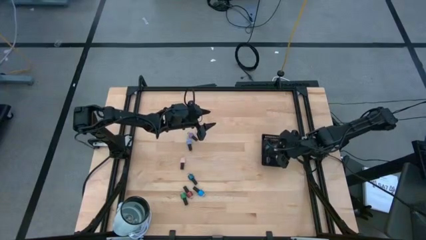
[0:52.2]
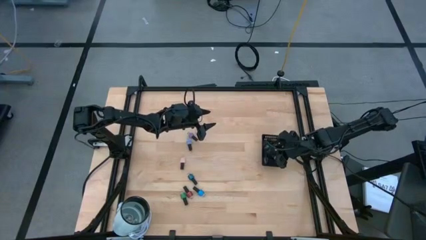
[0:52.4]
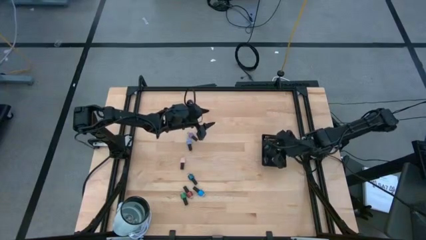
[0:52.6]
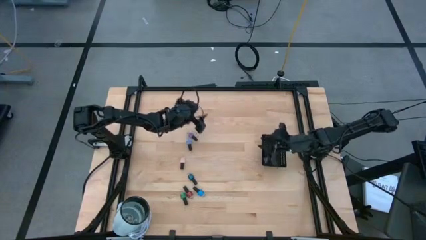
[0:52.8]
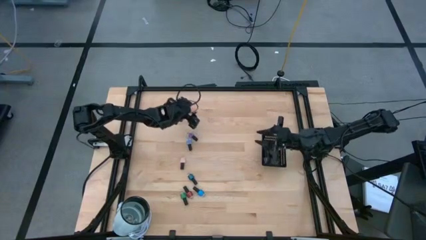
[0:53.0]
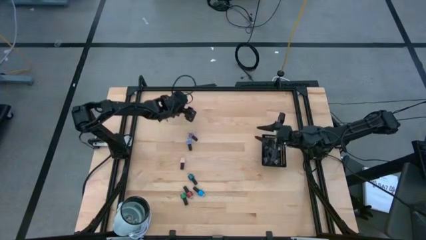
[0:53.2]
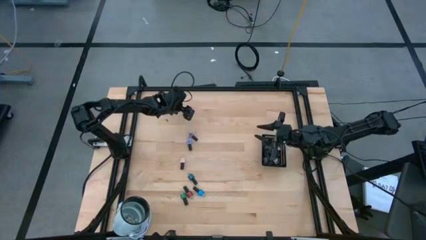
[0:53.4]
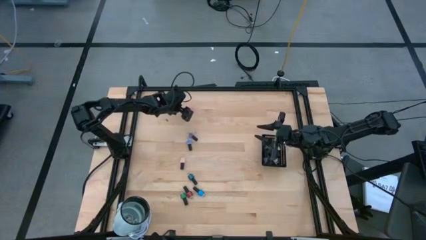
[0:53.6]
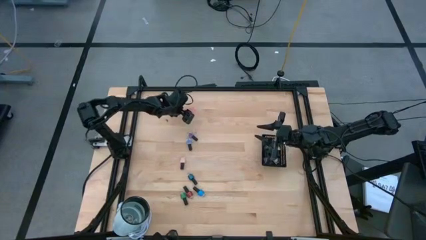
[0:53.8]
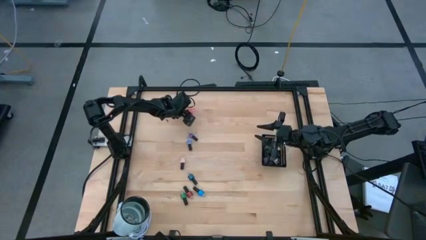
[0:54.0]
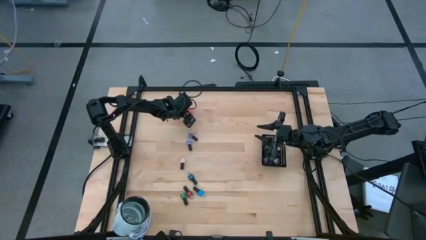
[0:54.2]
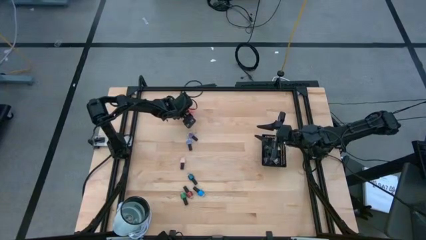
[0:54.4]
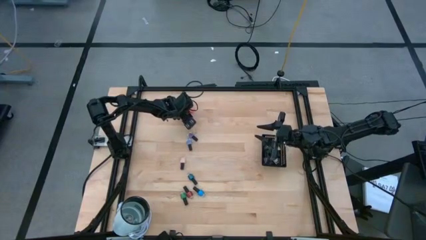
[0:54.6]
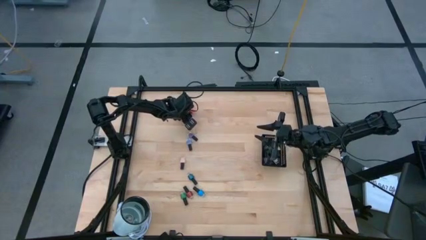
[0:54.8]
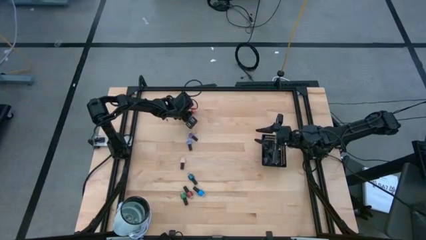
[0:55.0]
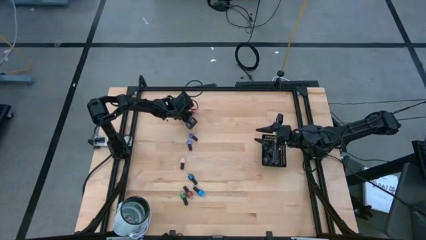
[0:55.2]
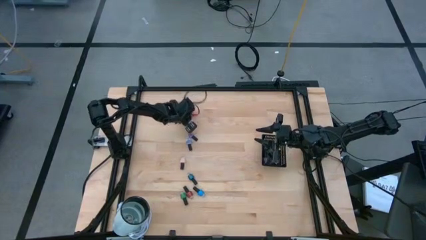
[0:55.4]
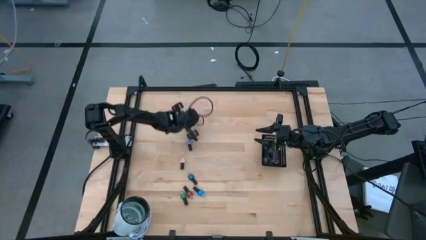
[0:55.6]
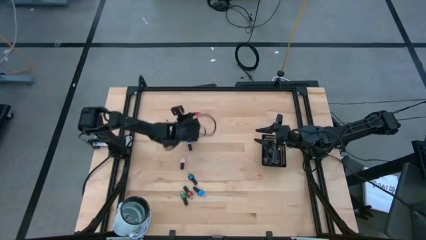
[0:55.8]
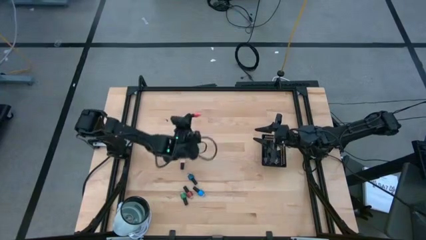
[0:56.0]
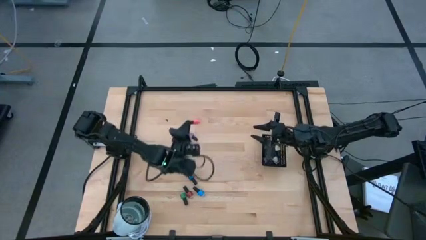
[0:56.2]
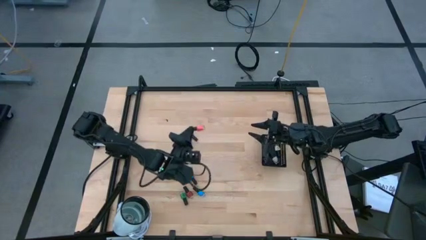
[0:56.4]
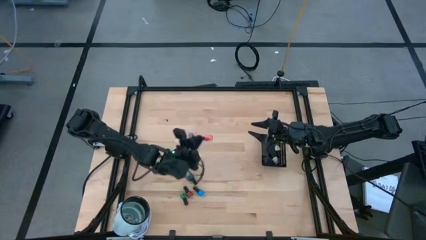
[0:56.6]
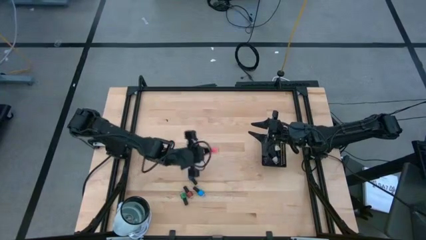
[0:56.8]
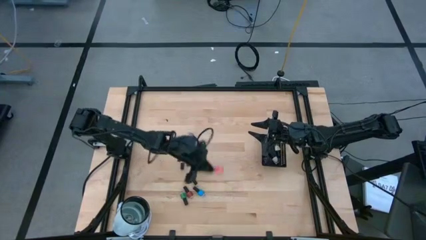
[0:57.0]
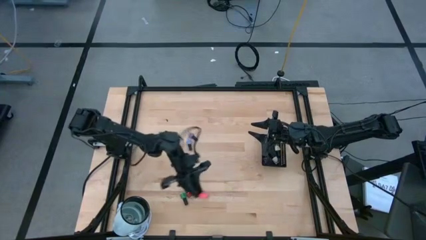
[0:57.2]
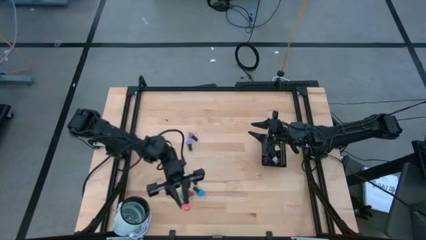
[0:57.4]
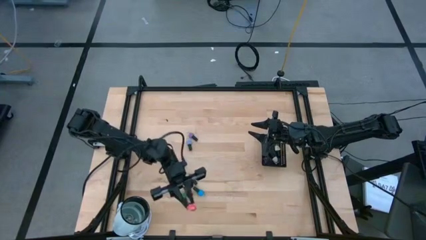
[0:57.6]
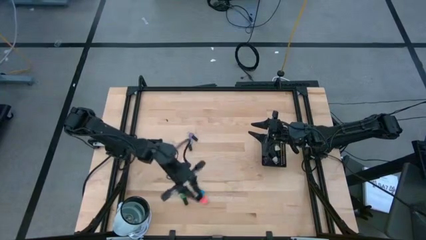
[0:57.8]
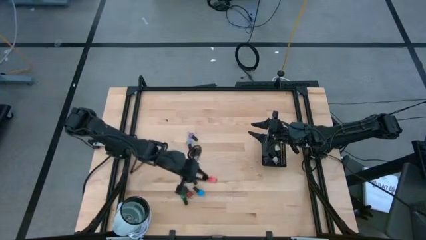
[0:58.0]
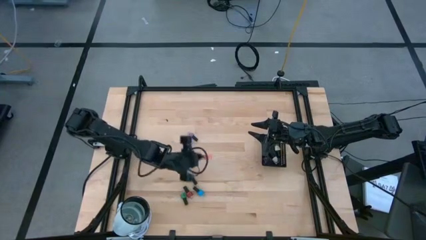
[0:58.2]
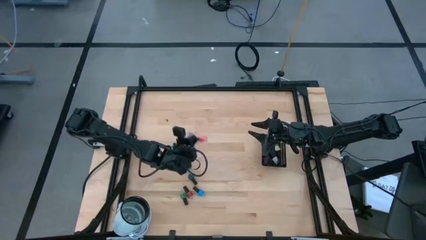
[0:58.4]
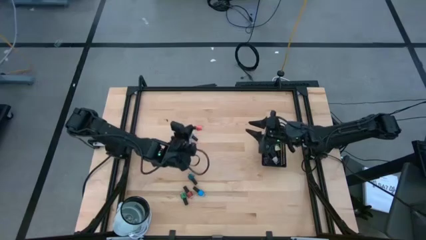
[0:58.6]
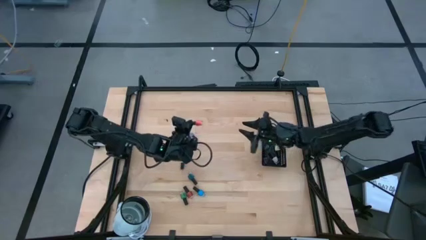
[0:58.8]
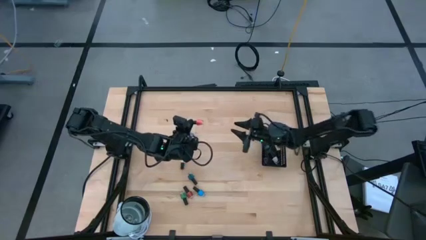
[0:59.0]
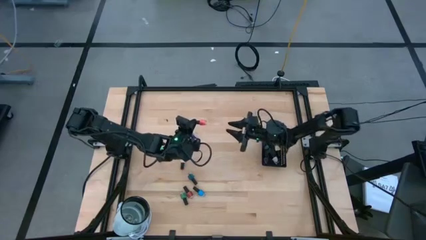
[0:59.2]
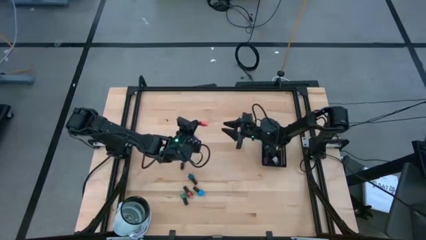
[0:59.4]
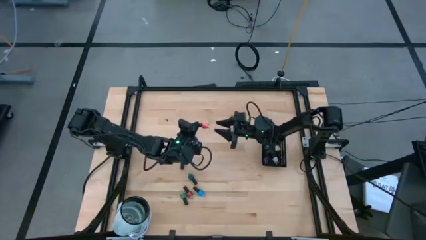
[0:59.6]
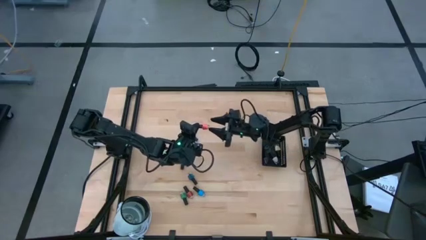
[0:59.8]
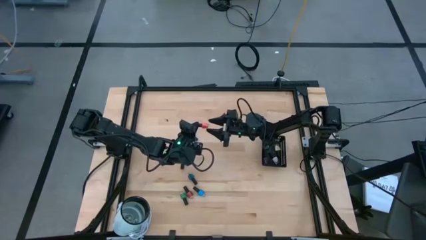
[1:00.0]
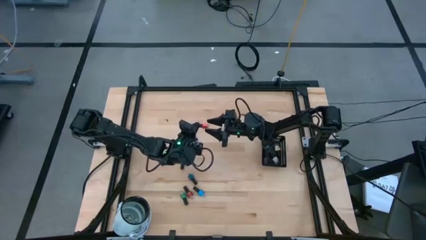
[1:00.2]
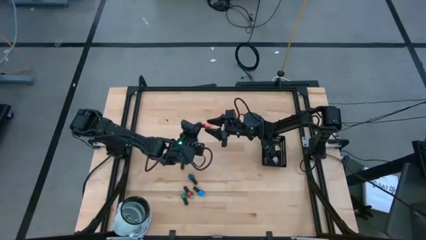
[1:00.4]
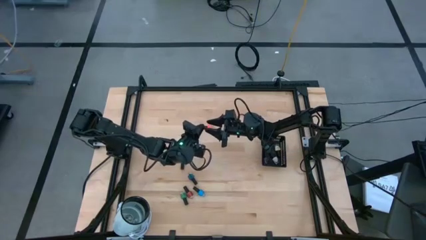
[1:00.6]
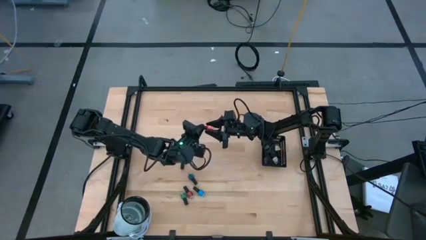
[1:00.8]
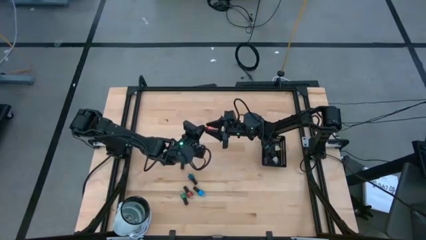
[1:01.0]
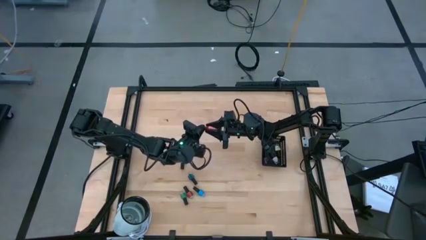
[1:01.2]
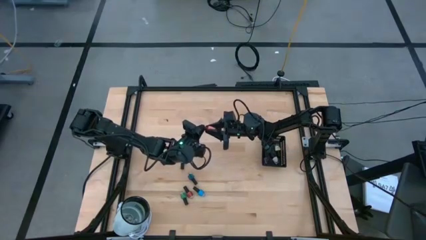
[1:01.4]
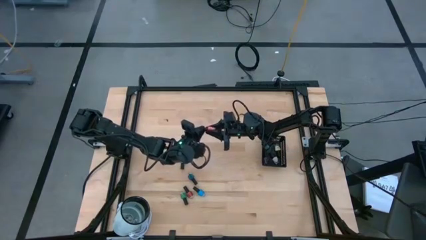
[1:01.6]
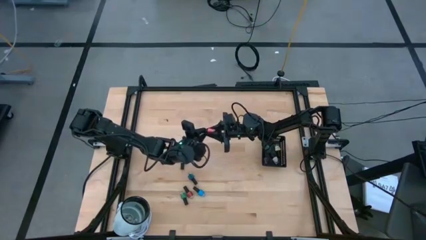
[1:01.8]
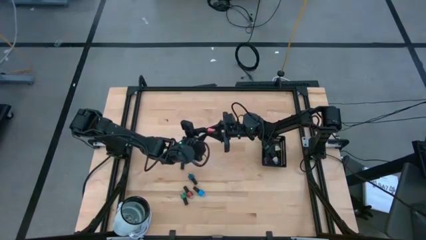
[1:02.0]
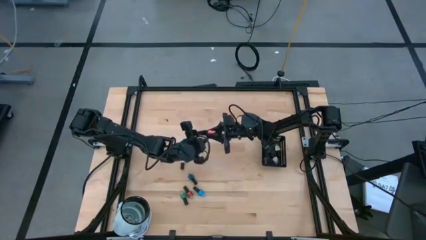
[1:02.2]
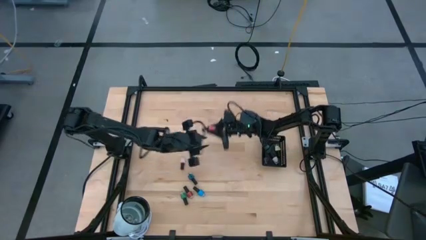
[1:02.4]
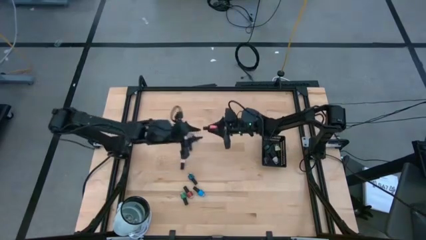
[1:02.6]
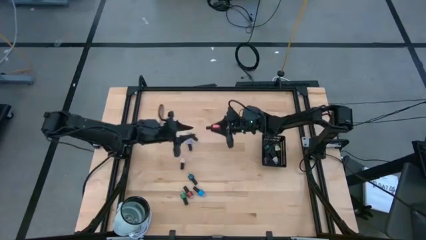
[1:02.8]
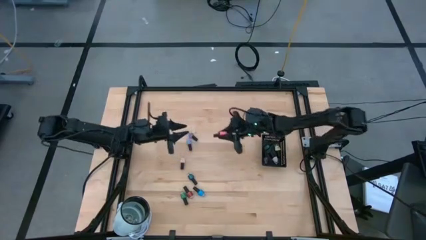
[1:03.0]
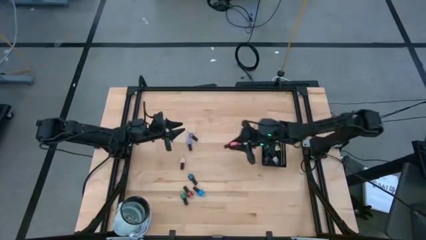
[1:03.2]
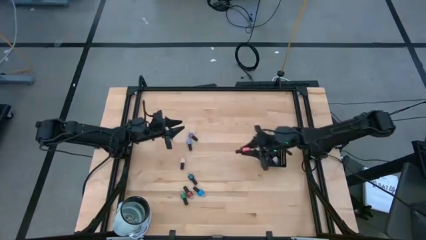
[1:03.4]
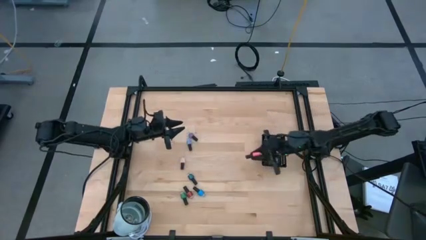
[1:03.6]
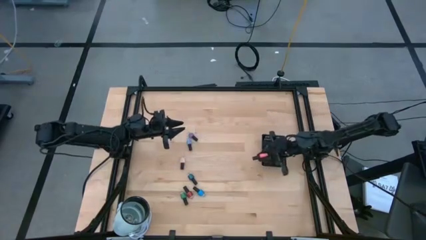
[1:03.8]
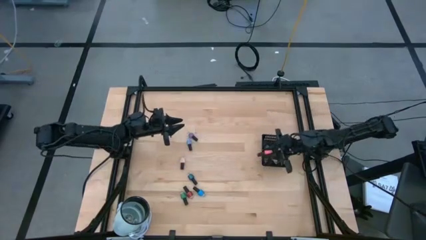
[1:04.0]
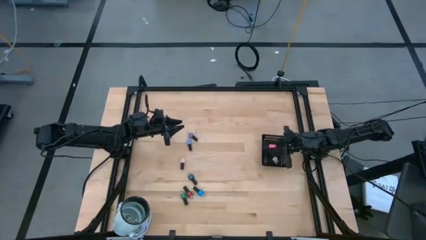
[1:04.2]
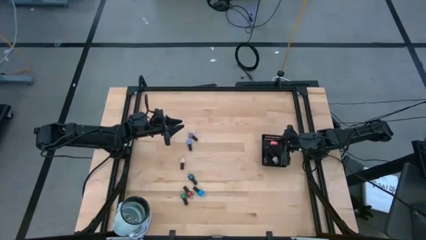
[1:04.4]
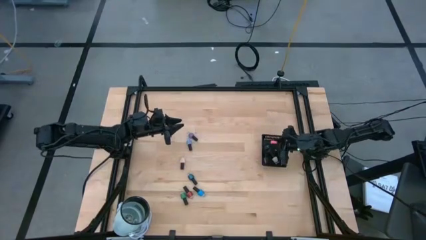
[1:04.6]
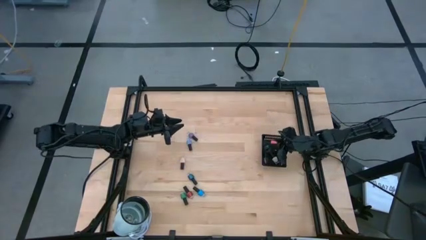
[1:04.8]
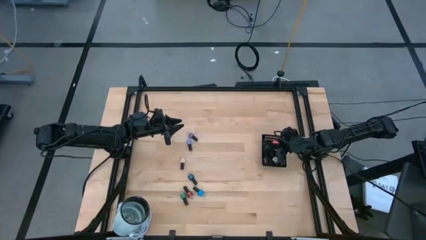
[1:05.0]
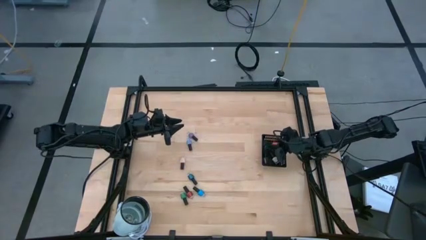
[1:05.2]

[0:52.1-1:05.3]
Task: Pick & Place Nail Polish
Put the light orange nail polish into the black basket
